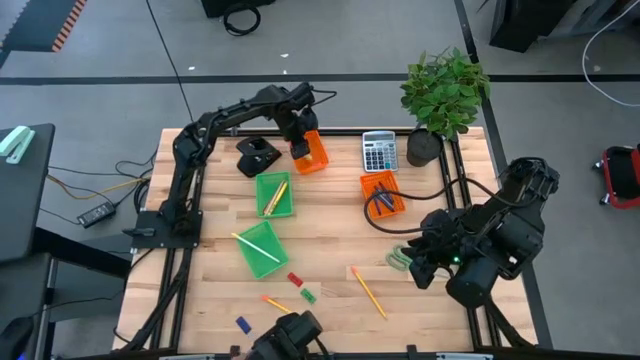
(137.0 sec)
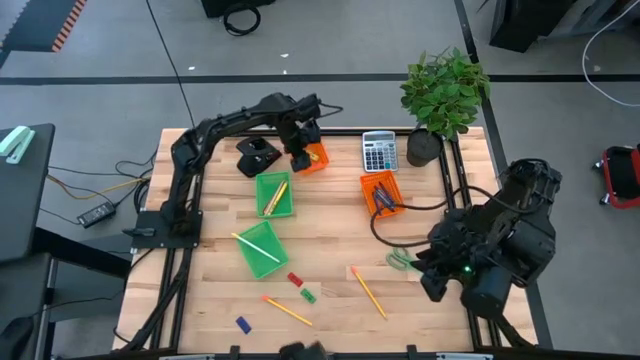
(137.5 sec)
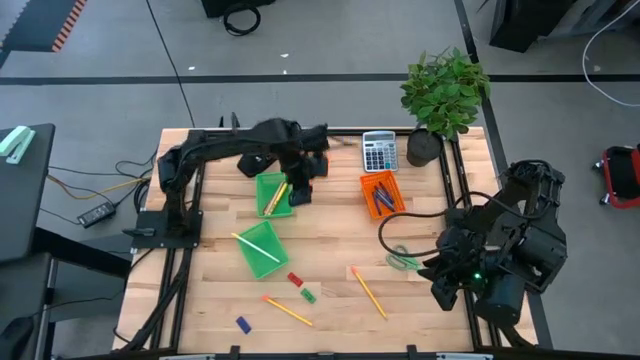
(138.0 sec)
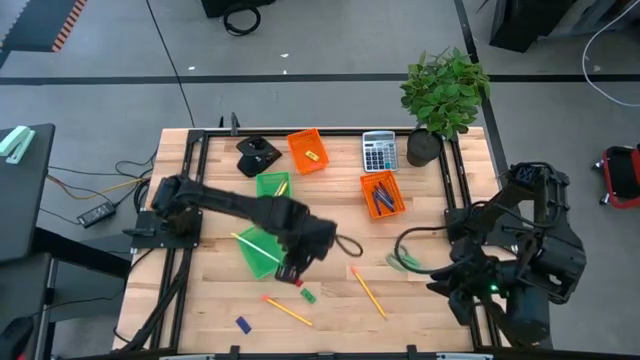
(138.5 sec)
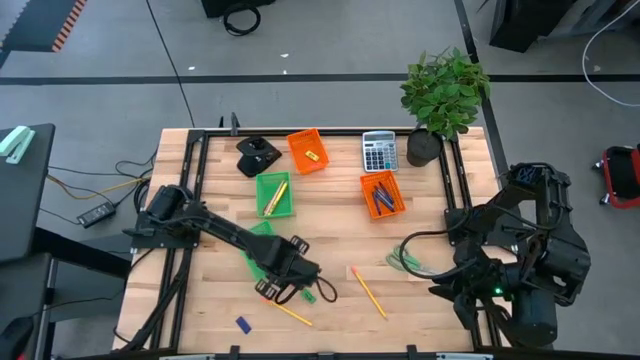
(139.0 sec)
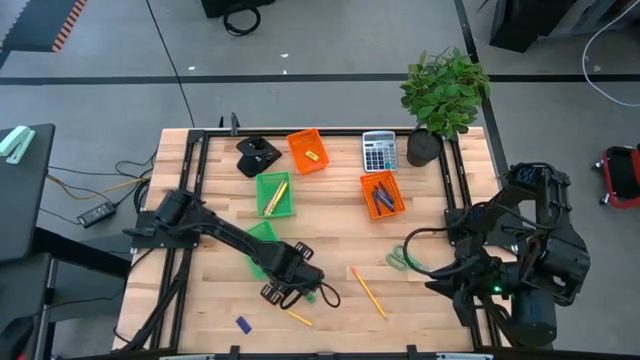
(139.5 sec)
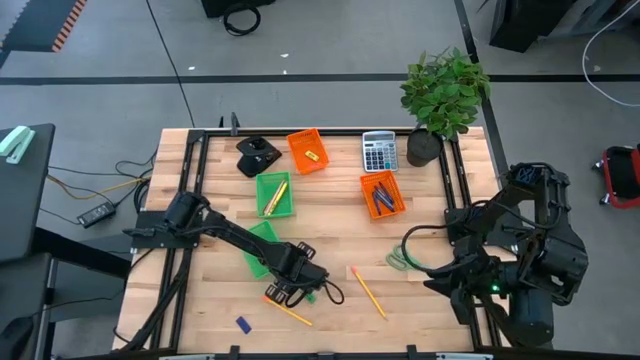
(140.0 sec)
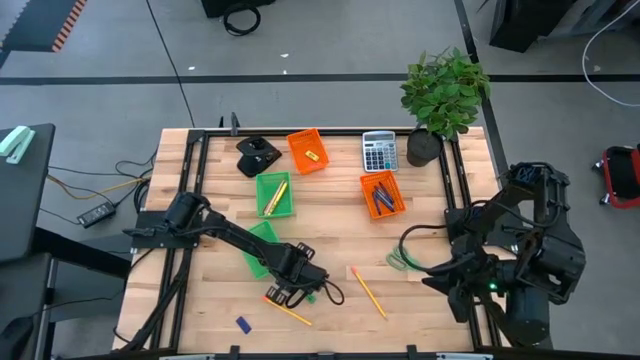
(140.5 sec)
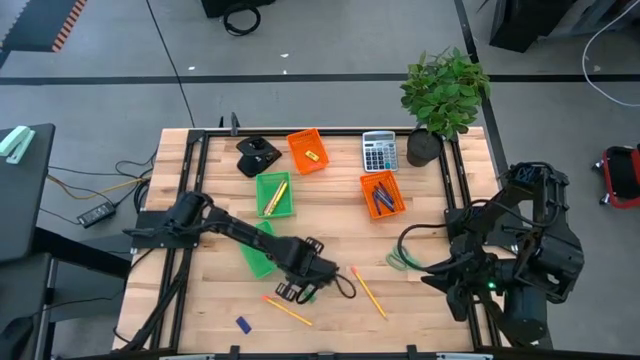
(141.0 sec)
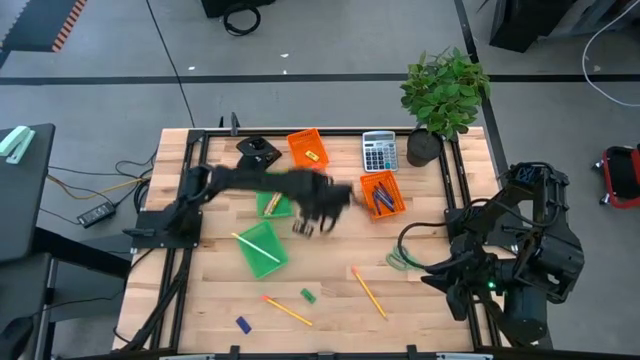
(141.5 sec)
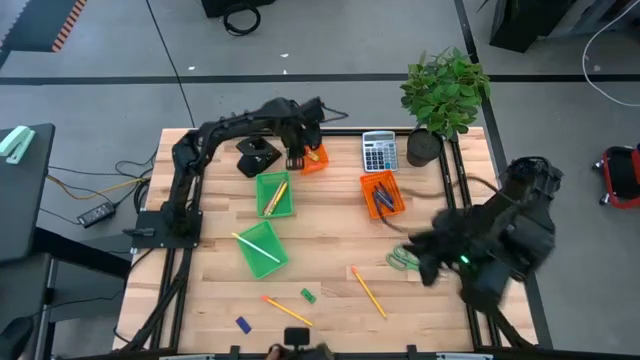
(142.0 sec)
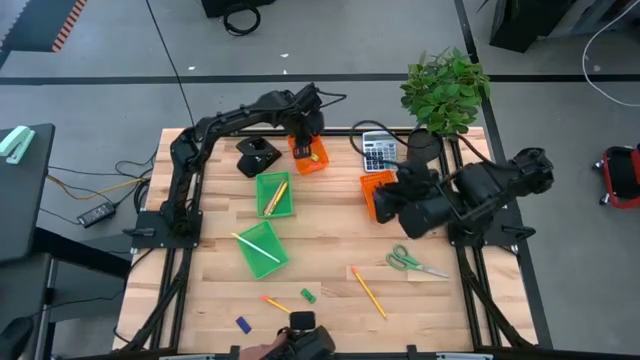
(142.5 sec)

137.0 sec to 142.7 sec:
Task: Sort crayons/erasers/pens/pencils in bins
Put the red eraser into the top orange bin

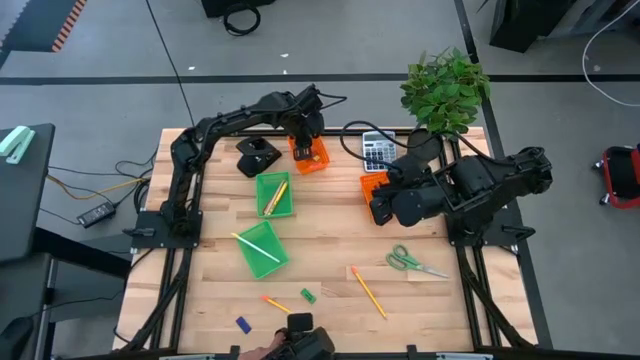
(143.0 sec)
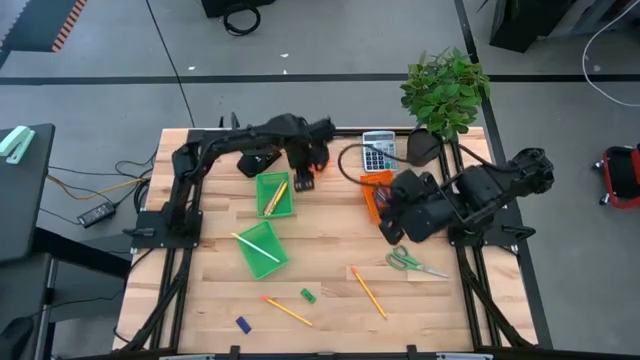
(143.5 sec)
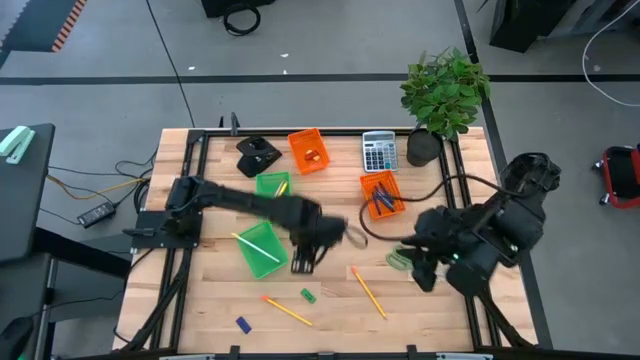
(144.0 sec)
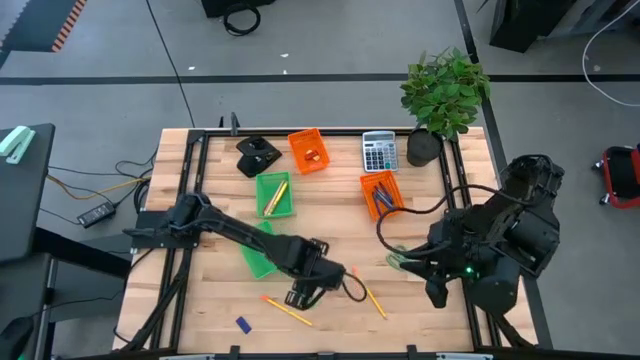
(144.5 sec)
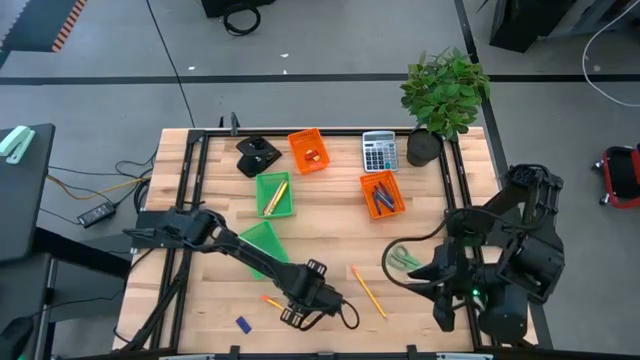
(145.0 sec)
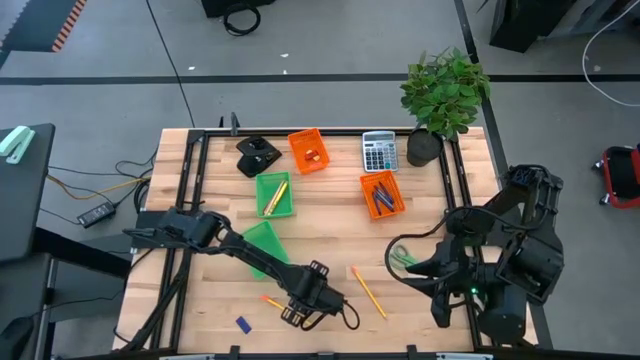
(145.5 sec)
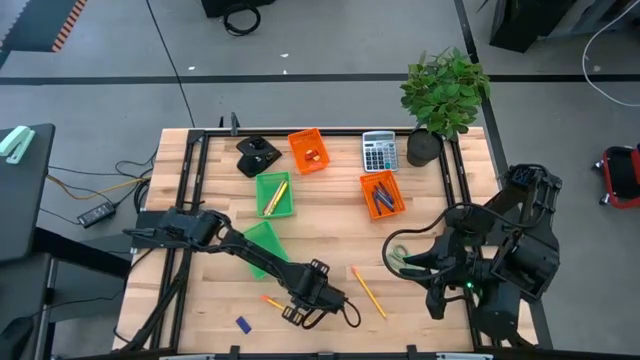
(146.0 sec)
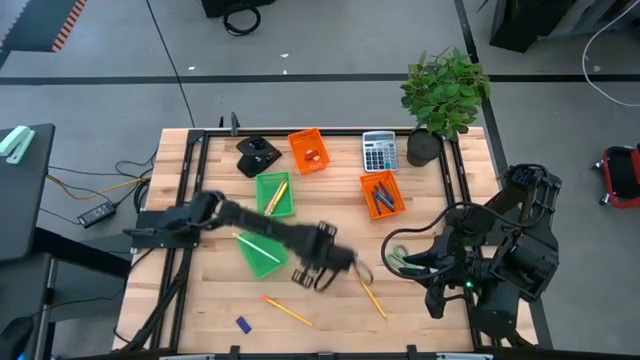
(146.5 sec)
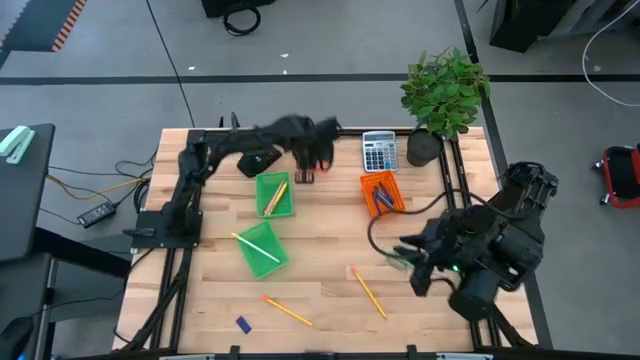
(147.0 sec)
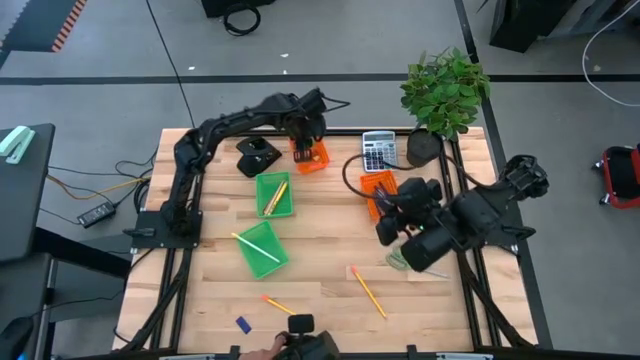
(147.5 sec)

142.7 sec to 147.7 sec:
Put the green eraser into the top orange bin

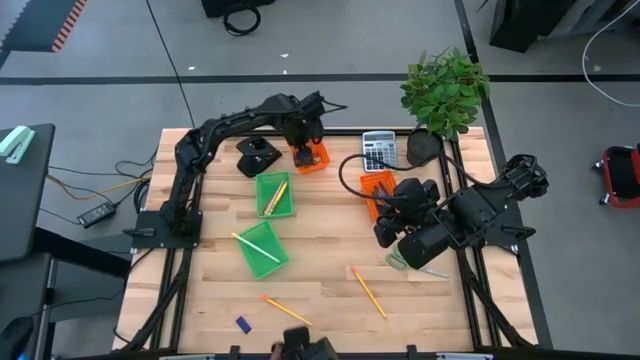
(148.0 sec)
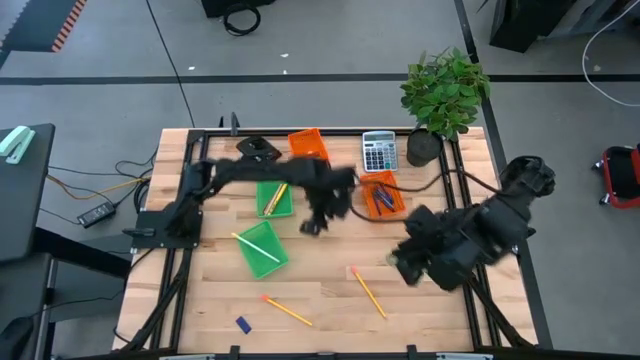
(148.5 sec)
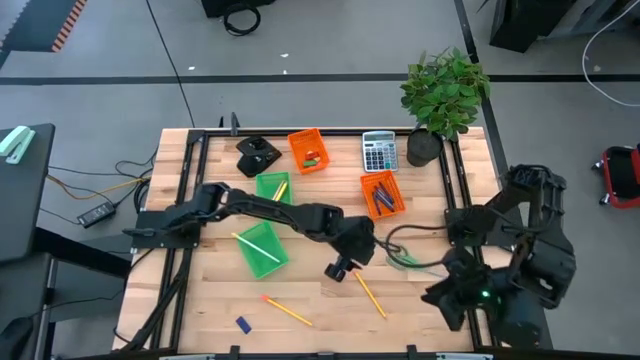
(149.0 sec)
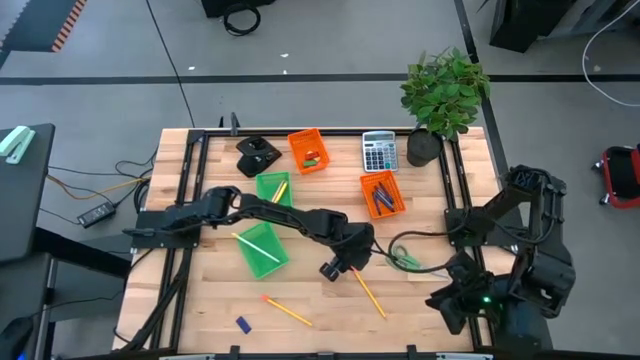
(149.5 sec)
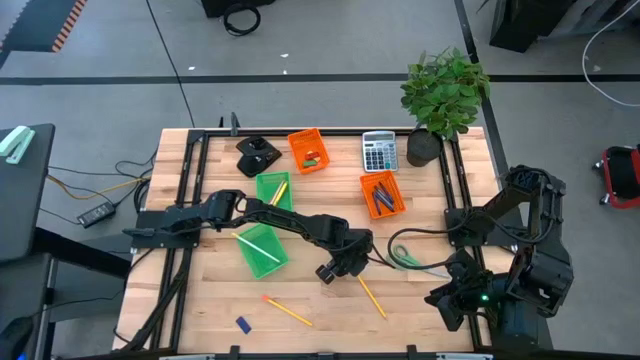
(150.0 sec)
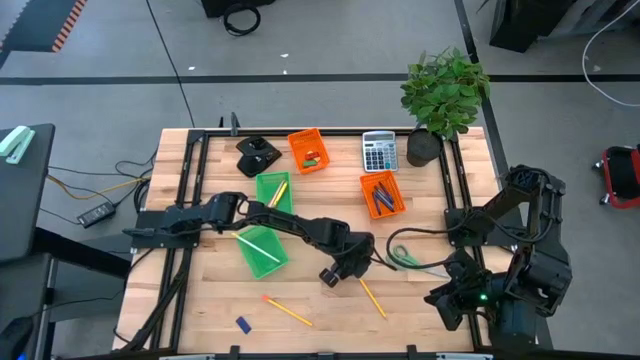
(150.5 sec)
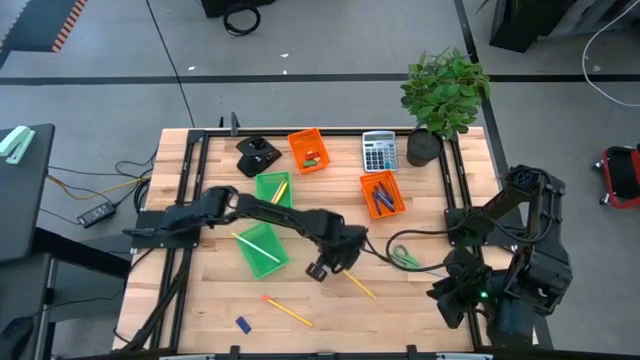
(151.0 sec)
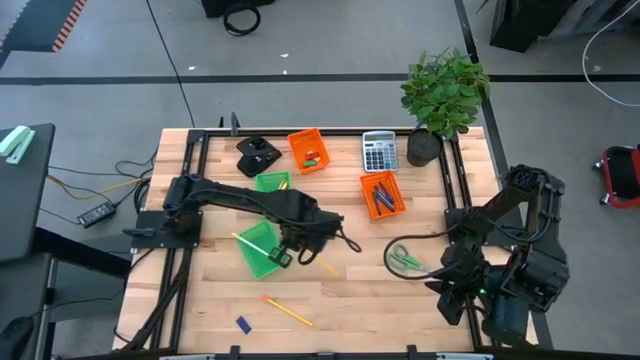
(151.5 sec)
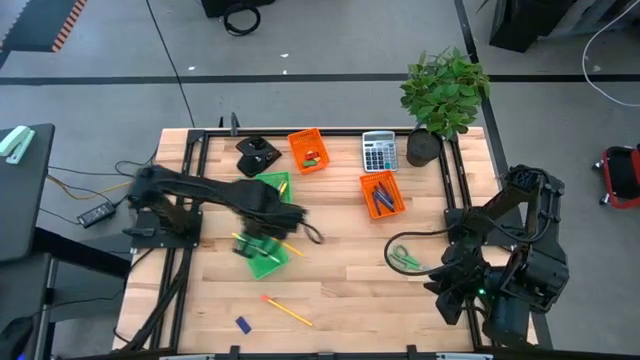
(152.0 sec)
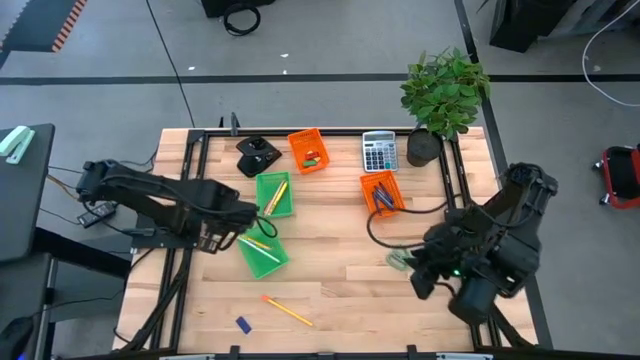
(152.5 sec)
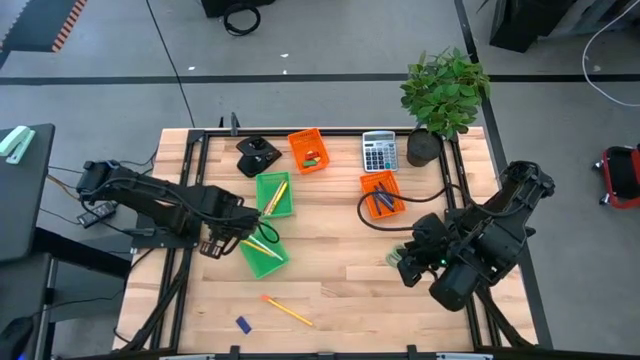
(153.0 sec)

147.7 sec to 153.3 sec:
Put the right yellow pencil into the bottom green bin

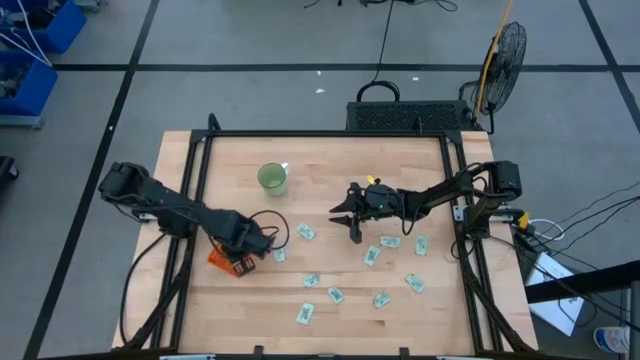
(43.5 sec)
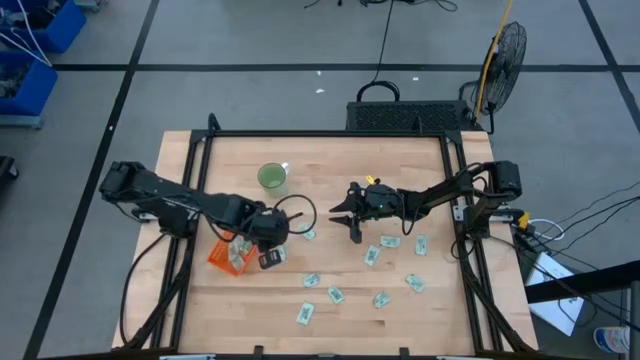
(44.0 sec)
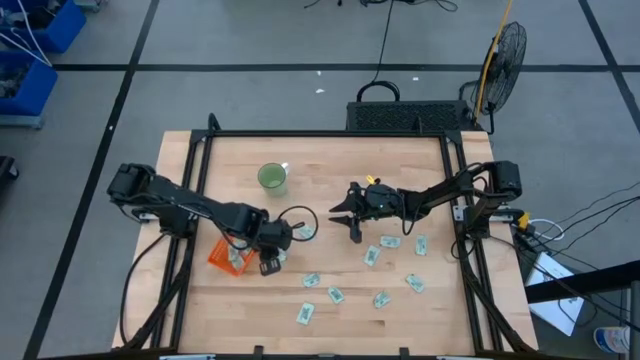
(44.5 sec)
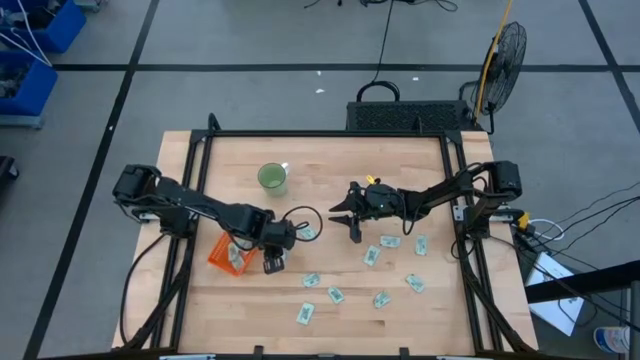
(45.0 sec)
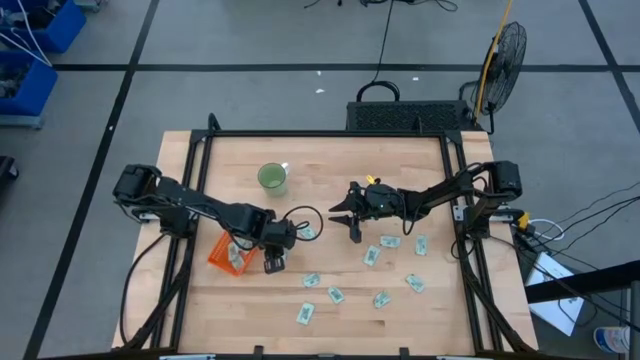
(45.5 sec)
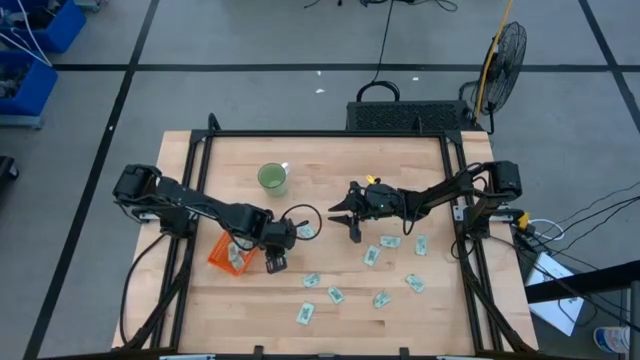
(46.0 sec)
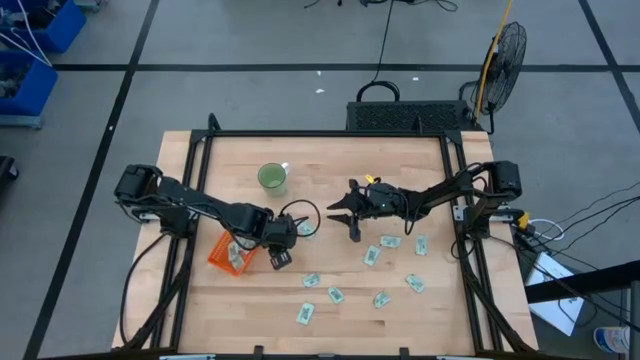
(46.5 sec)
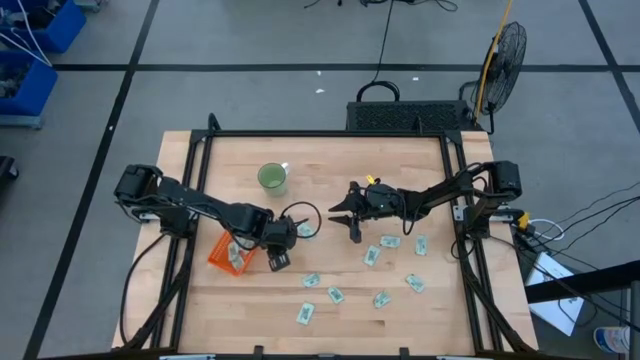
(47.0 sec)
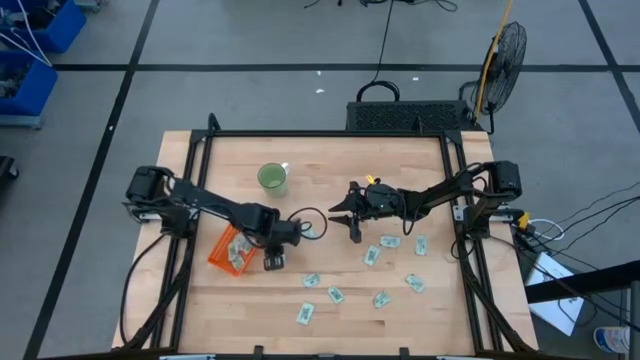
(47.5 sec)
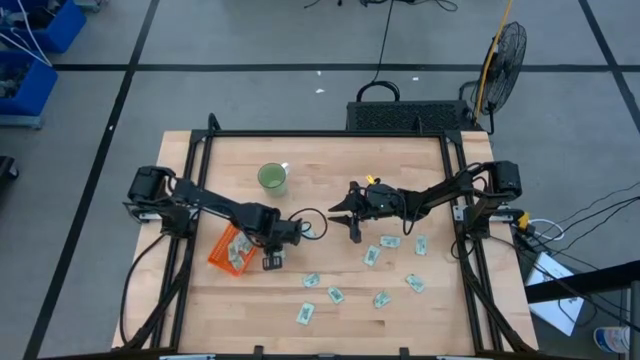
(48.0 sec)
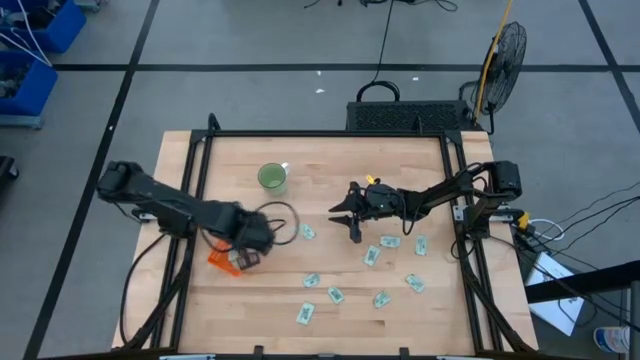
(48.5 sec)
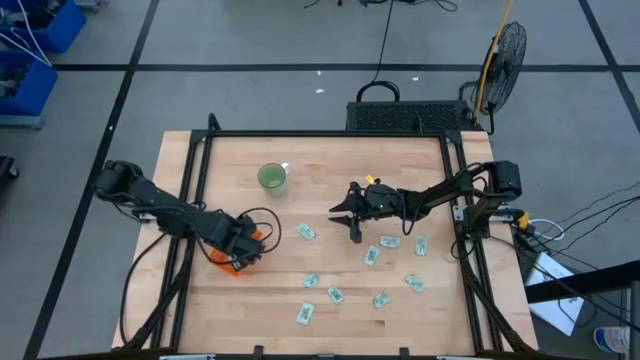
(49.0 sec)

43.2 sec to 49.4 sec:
Task: Pick and place Stevia / Truvia into bins
Put the stevia packet into the orange bin
